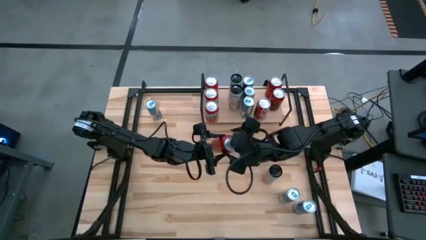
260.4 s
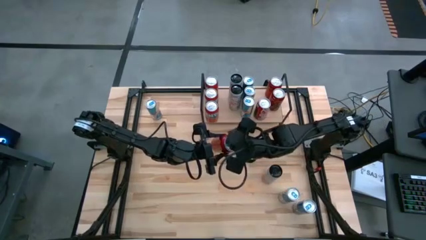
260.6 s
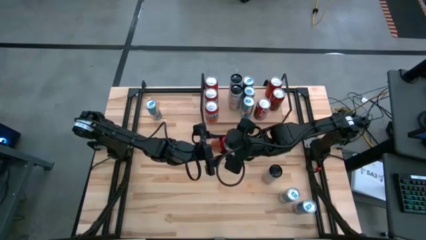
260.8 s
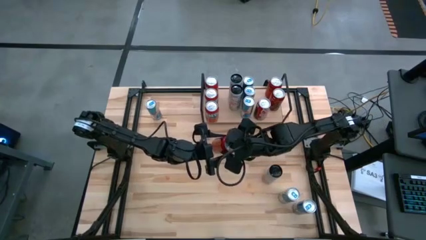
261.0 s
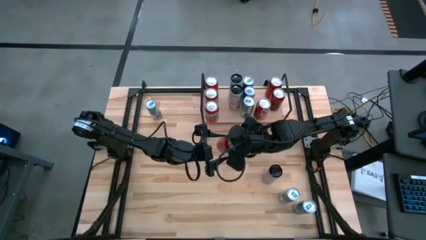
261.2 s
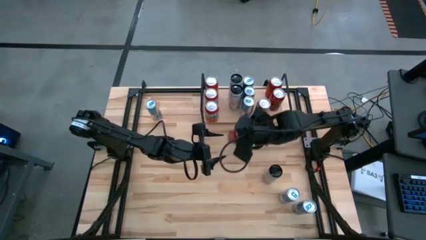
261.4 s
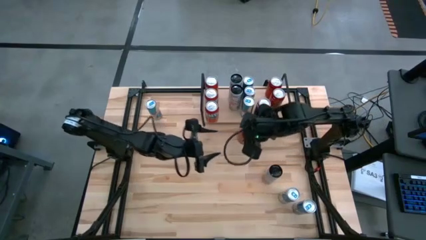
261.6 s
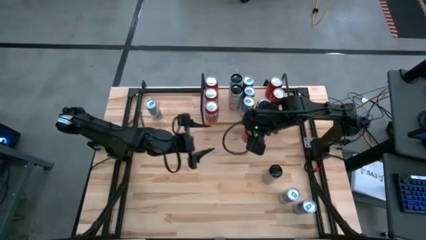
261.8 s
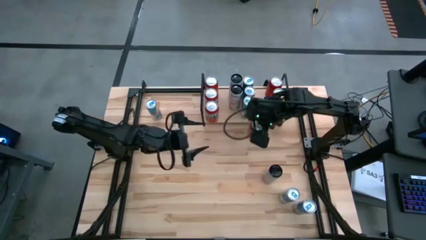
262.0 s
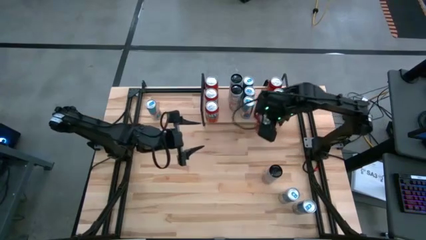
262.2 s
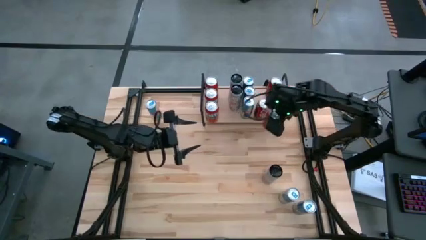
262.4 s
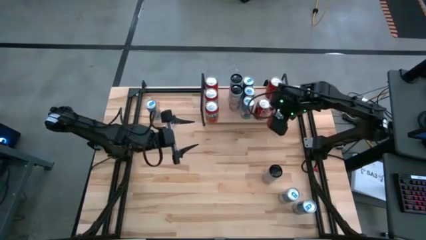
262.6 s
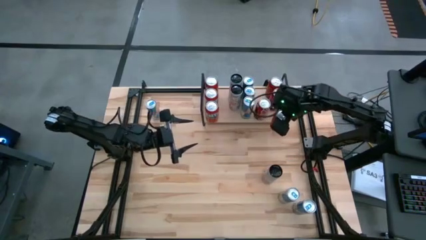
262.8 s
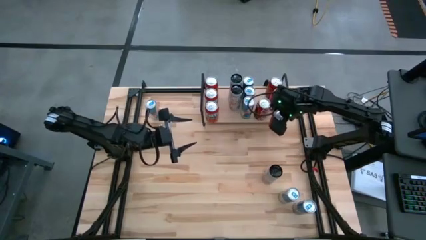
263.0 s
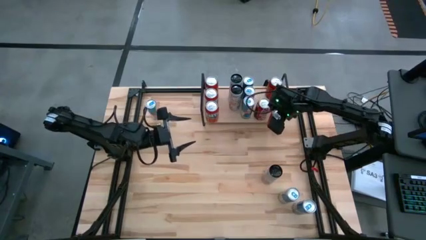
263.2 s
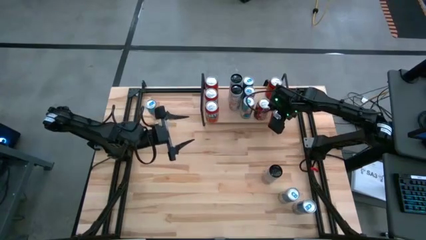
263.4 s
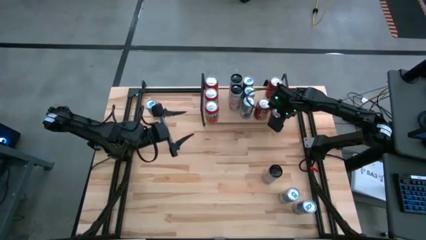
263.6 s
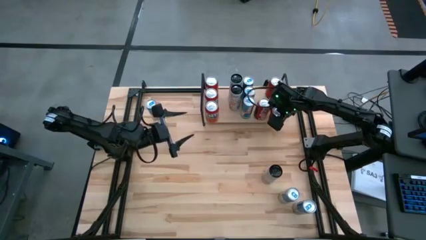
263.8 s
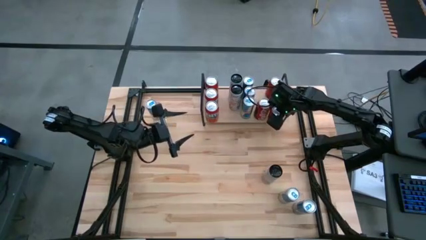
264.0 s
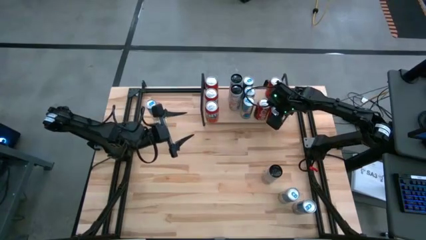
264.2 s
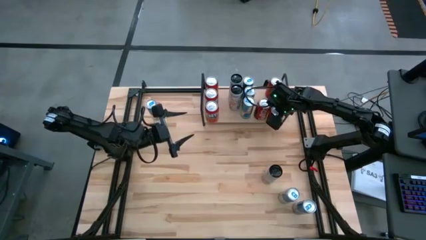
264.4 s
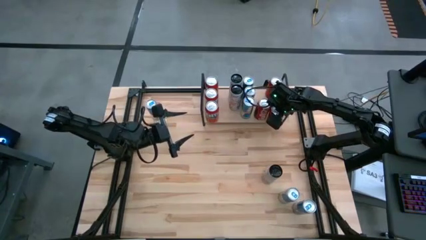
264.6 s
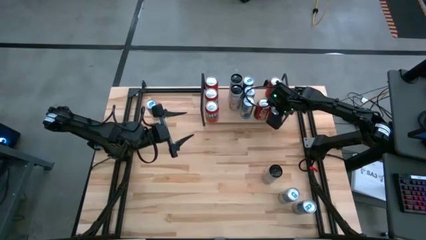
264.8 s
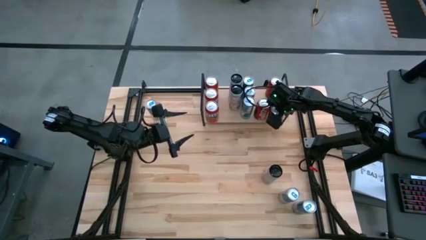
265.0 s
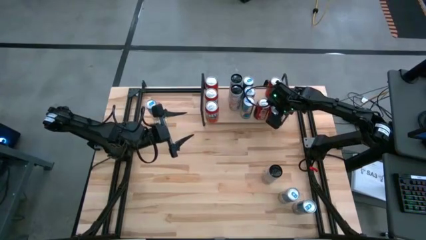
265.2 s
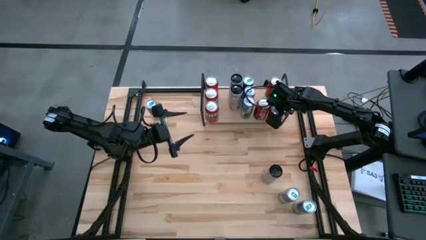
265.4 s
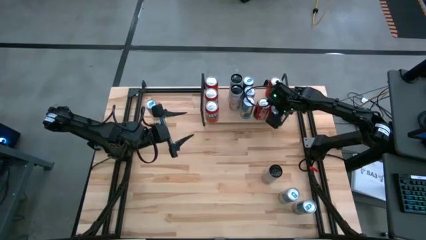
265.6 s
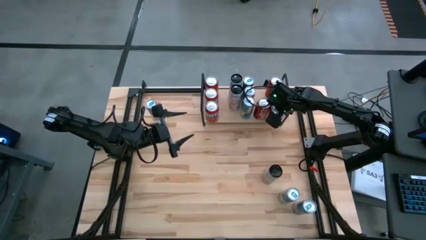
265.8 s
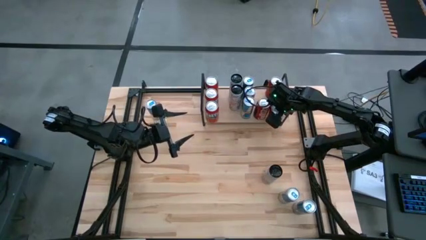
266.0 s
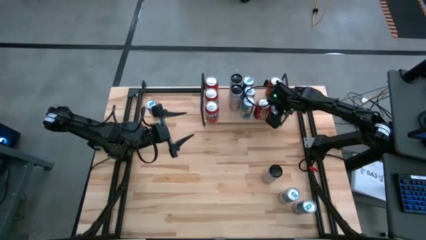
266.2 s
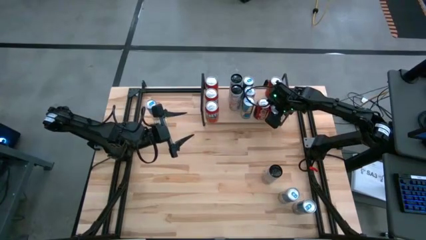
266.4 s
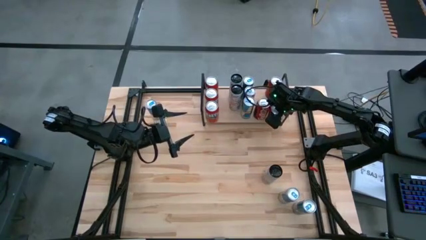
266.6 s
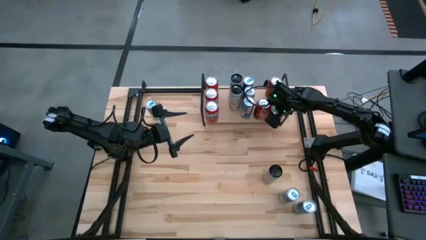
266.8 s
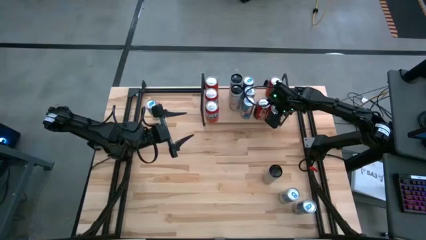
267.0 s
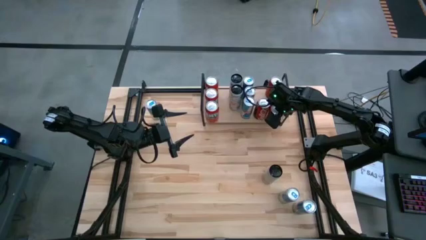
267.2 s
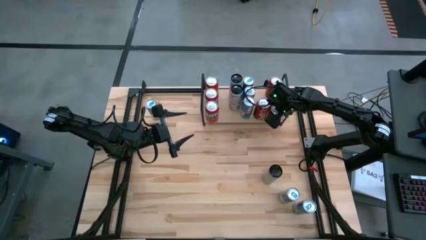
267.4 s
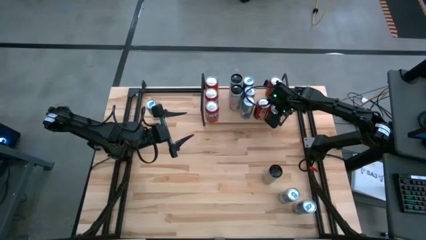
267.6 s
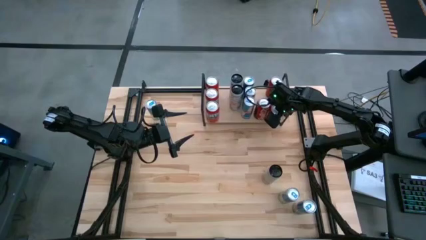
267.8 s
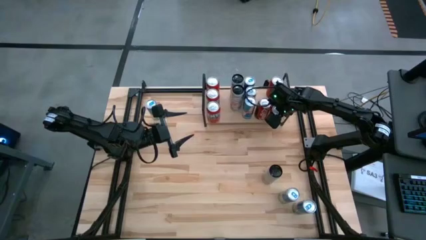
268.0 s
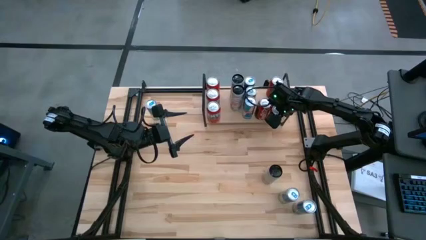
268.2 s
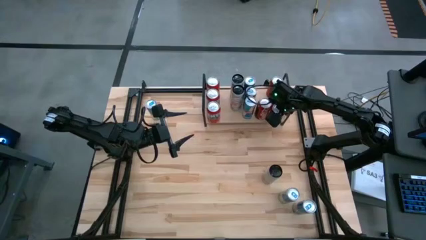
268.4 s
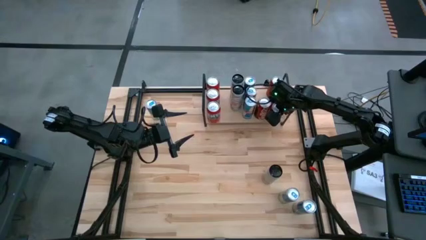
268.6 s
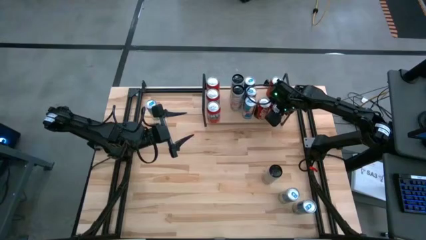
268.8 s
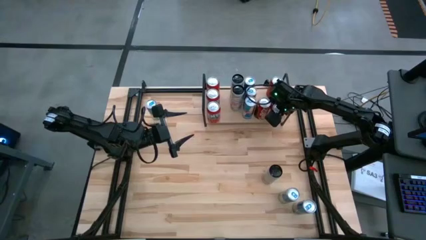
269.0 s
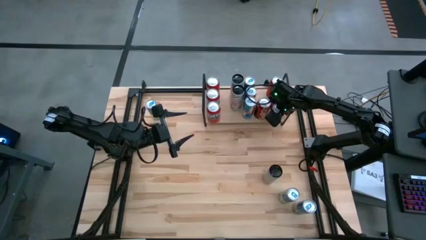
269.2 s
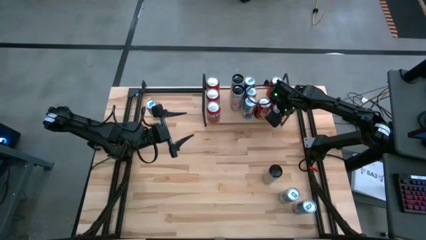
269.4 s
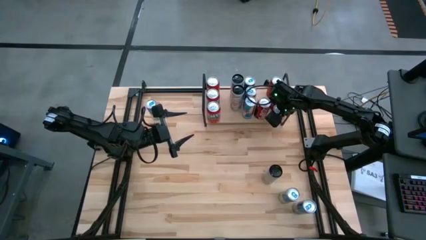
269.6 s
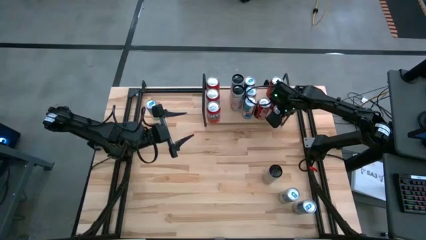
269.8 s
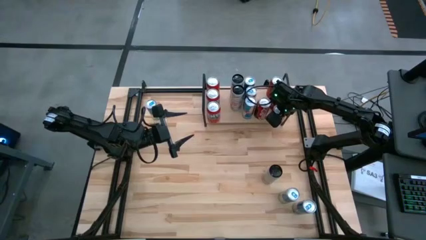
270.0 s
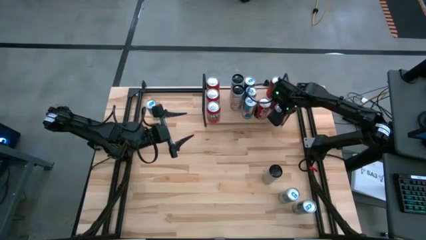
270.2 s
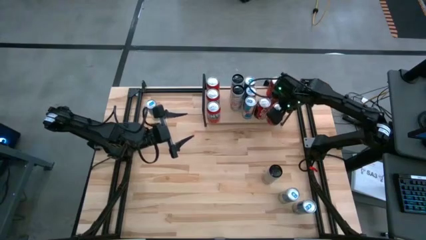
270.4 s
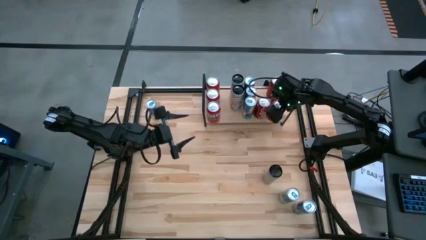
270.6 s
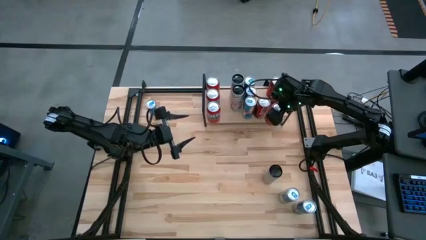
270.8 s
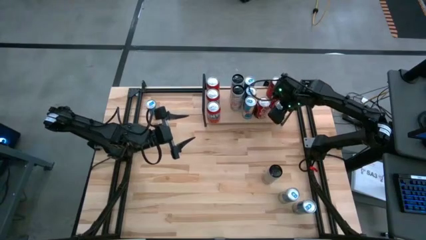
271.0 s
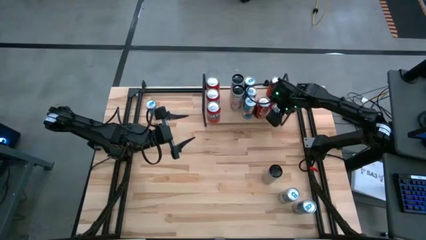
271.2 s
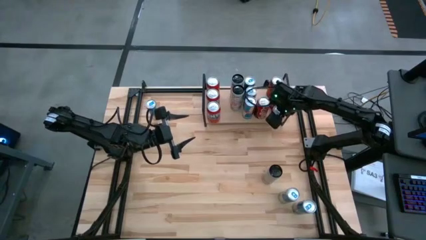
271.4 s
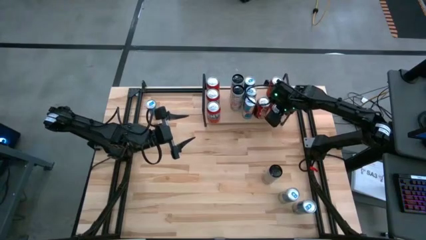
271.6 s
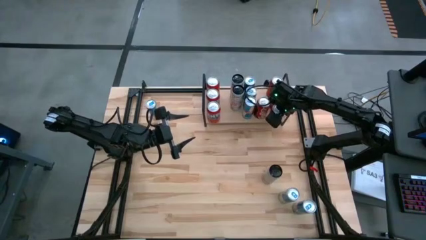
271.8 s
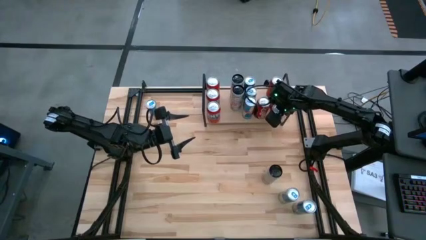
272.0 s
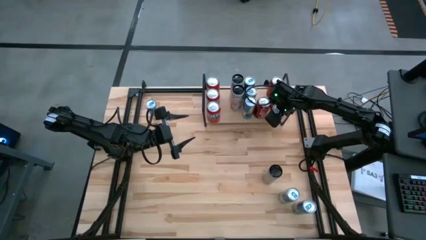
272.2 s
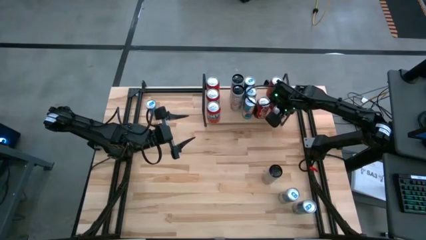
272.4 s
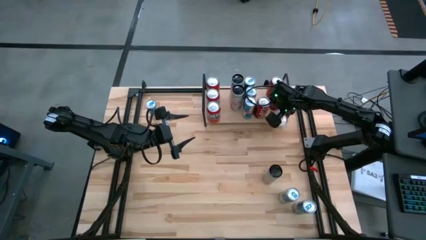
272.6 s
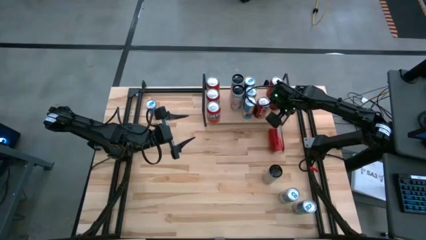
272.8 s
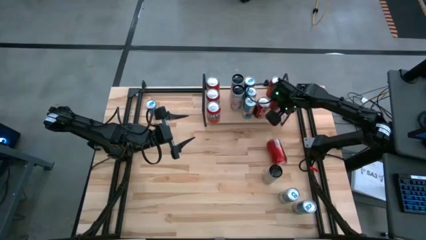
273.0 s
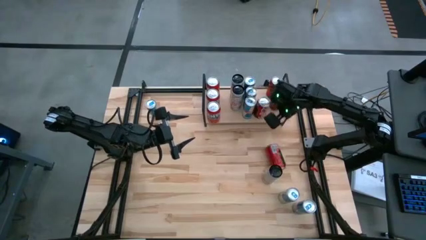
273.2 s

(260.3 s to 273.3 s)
Task: Place canned beverage on shelf
Put the dark red soda can on the shelf

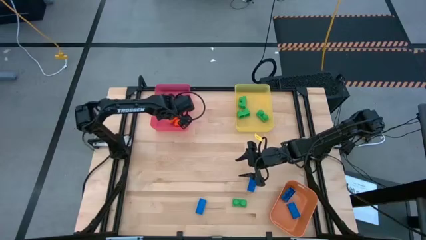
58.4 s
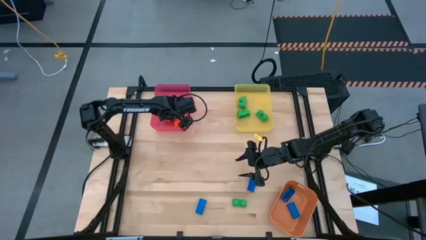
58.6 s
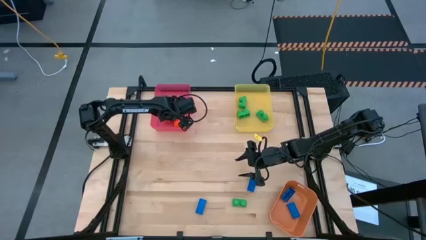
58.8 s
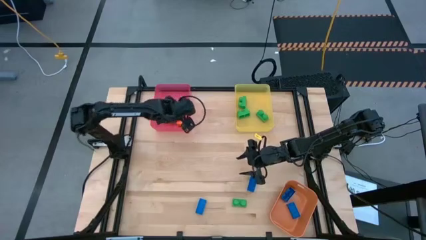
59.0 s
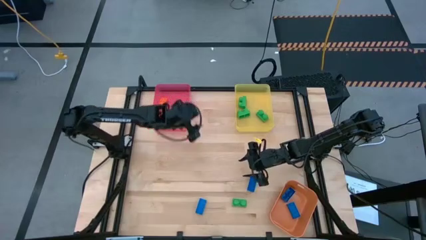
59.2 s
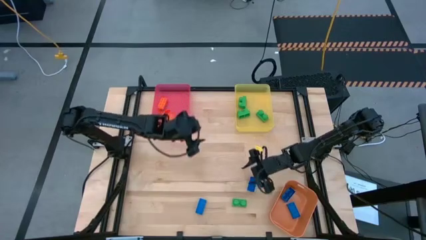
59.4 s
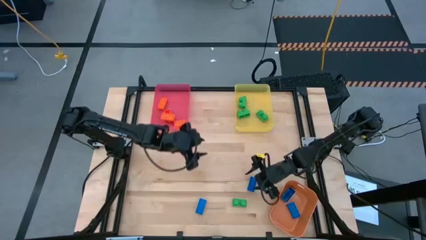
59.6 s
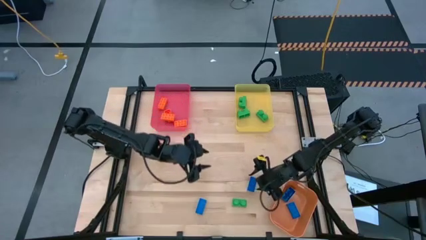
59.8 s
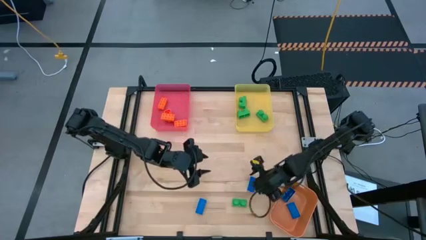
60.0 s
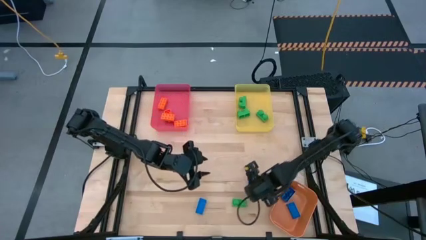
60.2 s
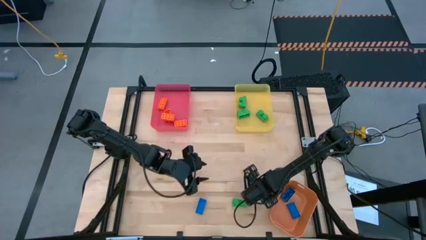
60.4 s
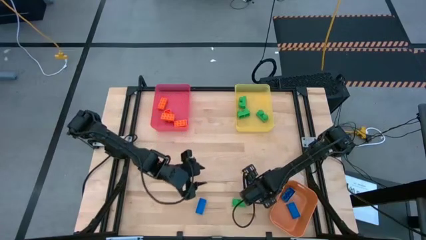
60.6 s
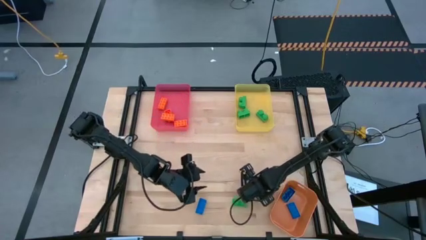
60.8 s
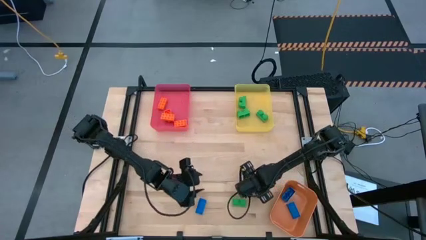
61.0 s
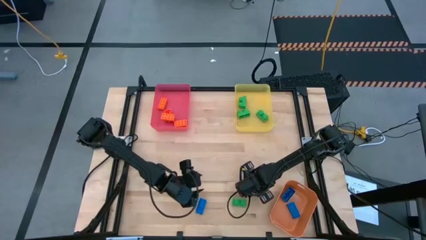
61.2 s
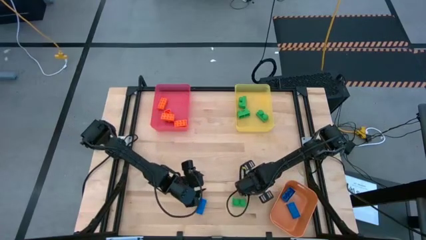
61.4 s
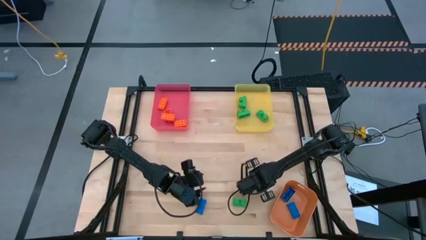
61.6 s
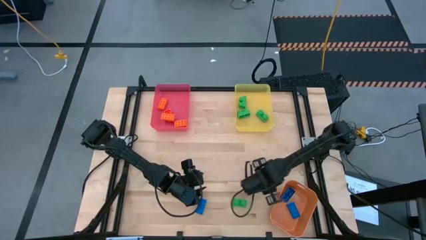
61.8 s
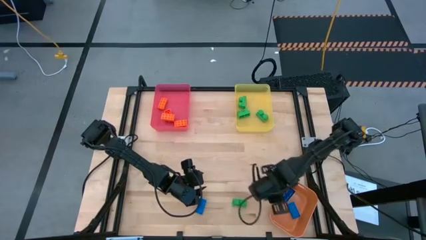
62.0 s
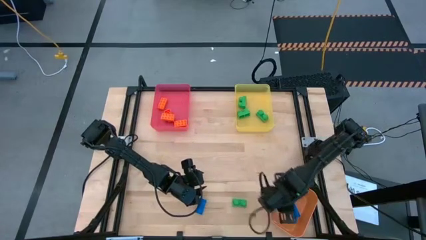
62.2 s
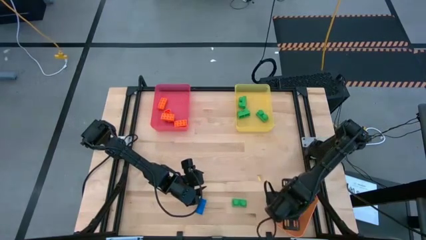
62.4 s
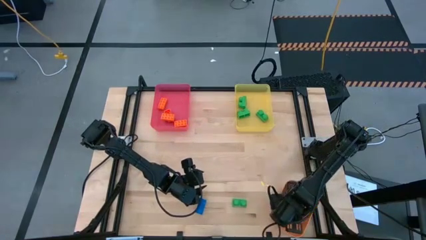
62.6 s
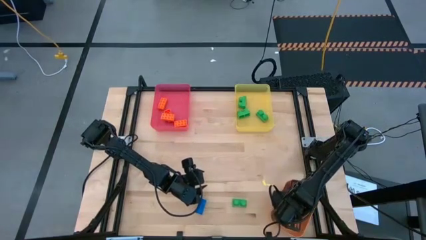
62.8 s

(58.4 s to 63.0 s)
Task: Sort & place blocks by color
Put the right blue game piece into the orange bin
